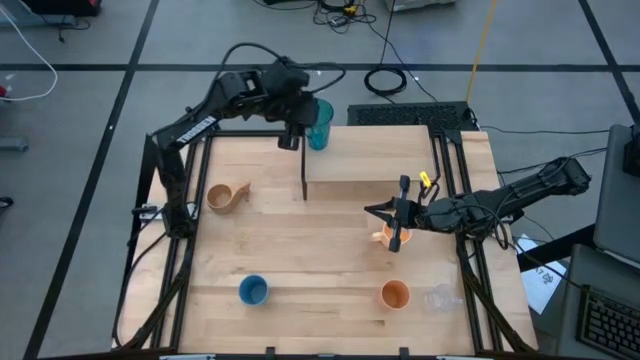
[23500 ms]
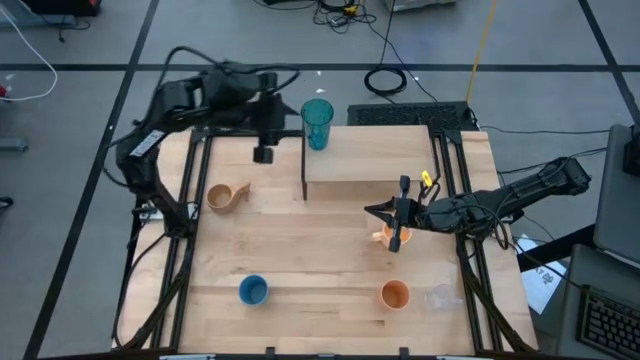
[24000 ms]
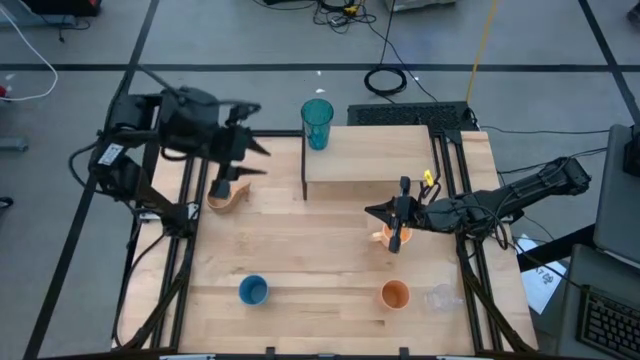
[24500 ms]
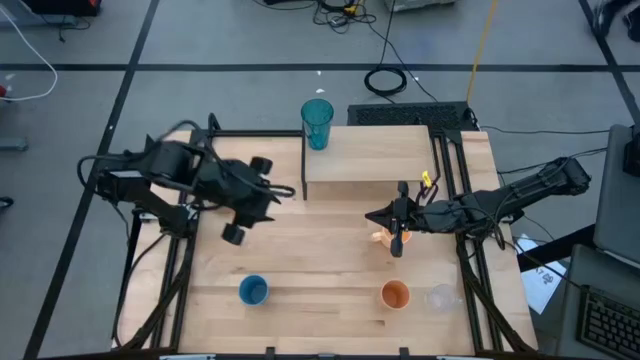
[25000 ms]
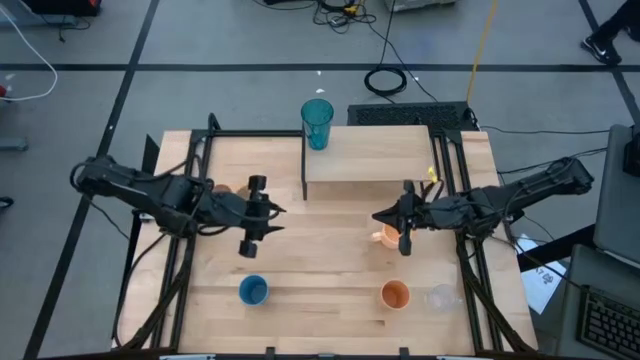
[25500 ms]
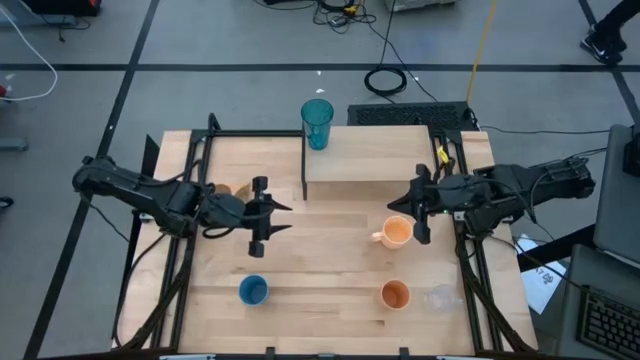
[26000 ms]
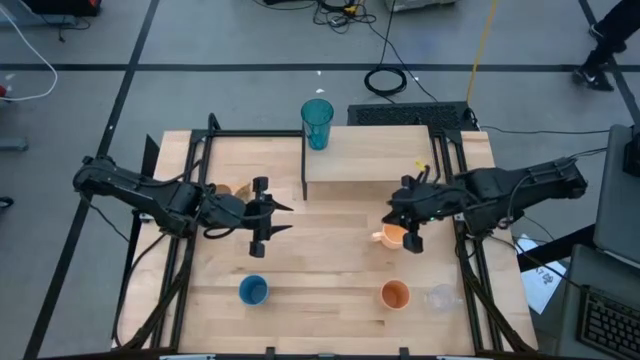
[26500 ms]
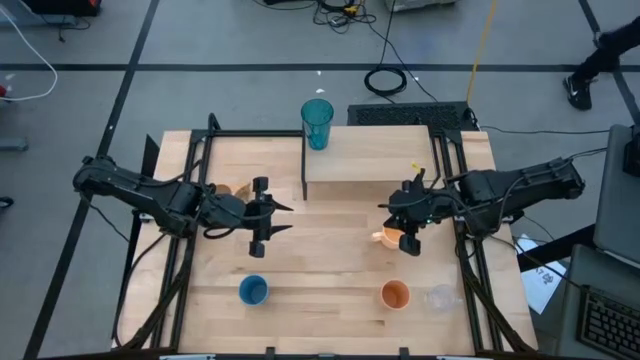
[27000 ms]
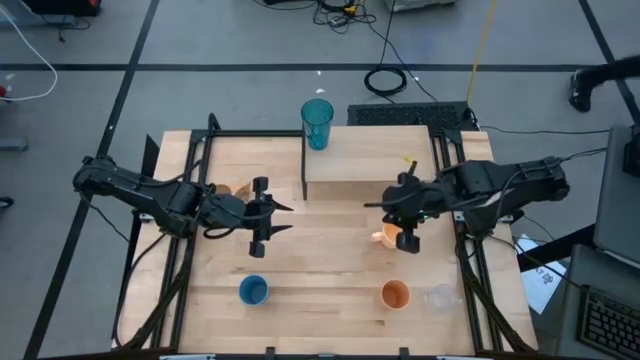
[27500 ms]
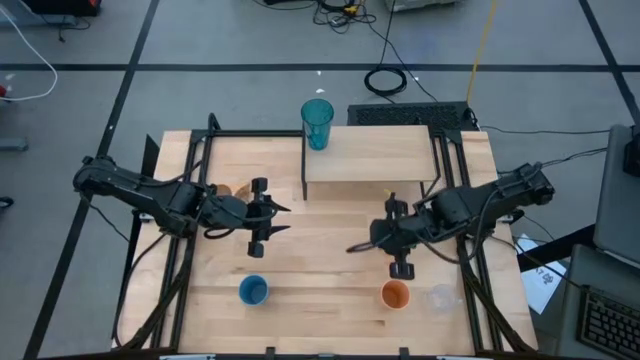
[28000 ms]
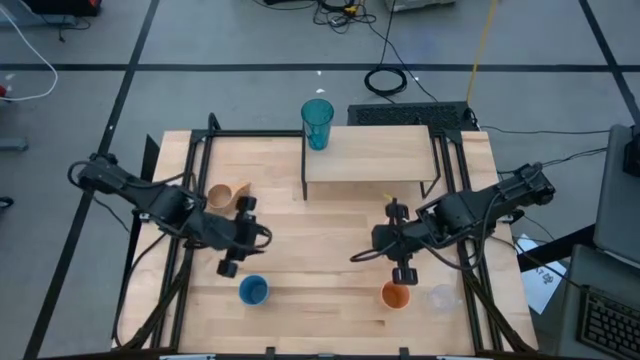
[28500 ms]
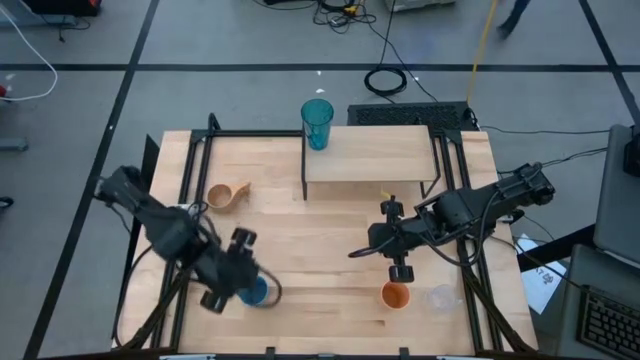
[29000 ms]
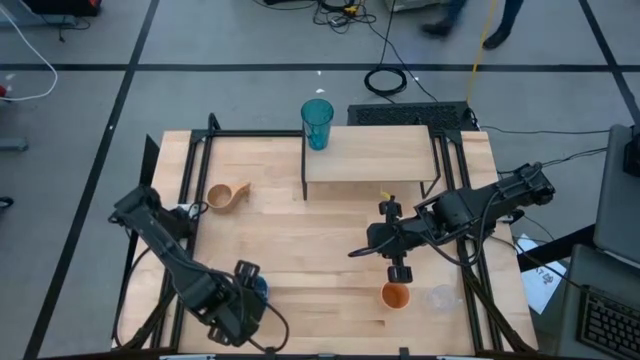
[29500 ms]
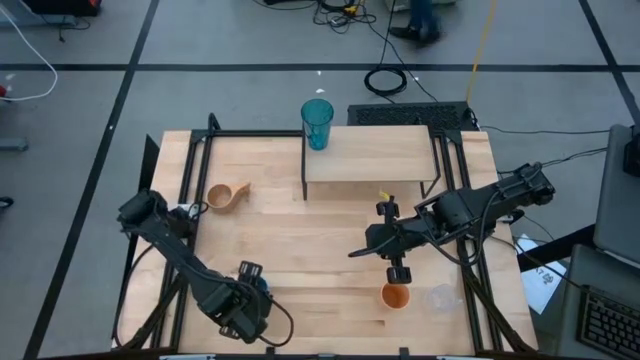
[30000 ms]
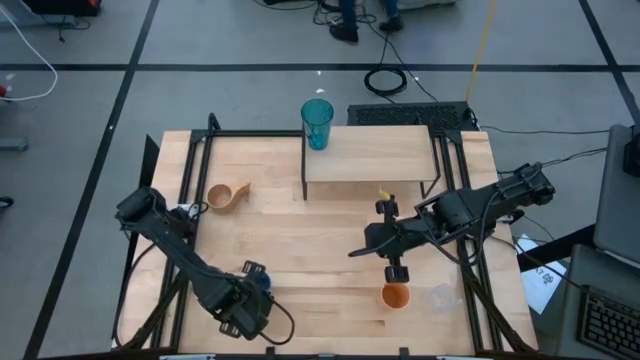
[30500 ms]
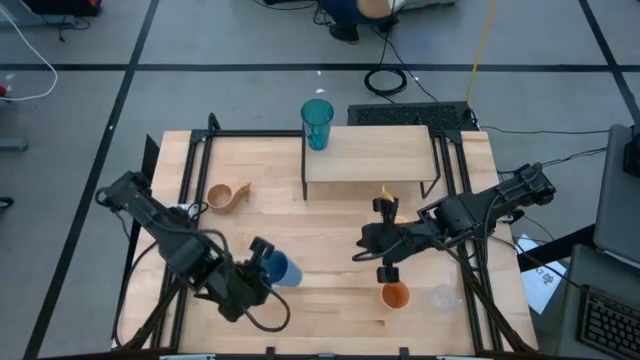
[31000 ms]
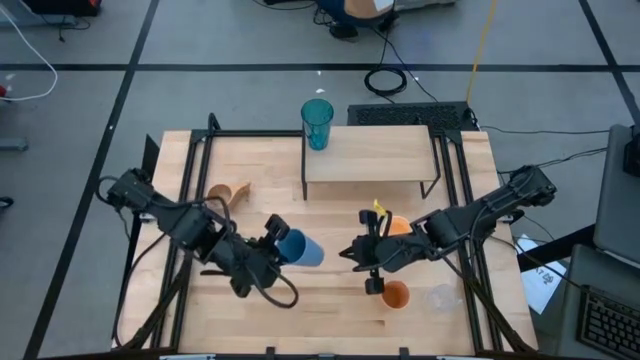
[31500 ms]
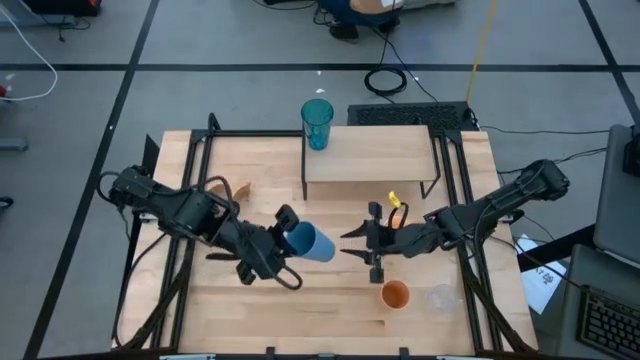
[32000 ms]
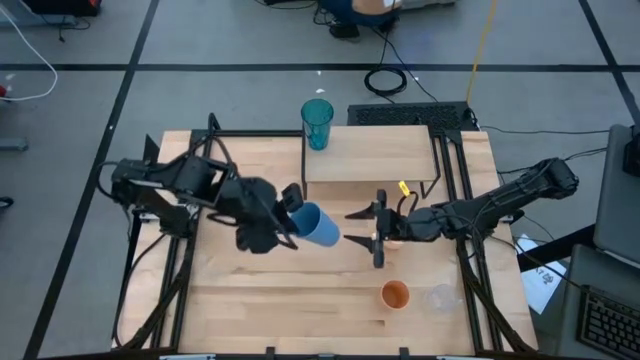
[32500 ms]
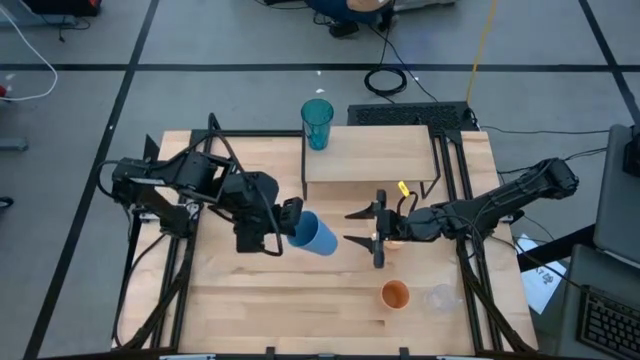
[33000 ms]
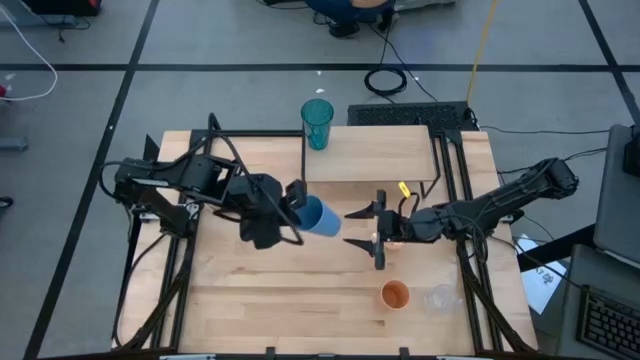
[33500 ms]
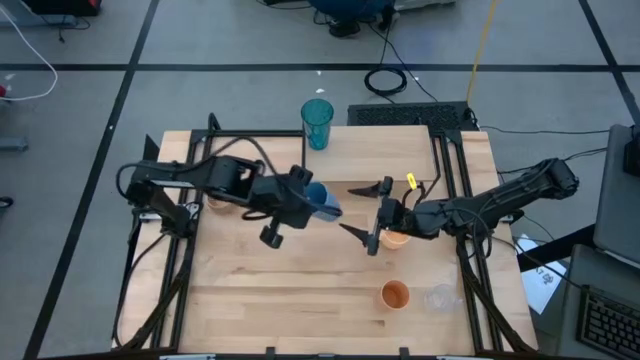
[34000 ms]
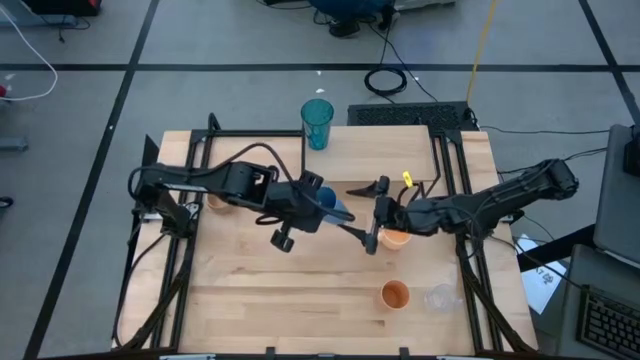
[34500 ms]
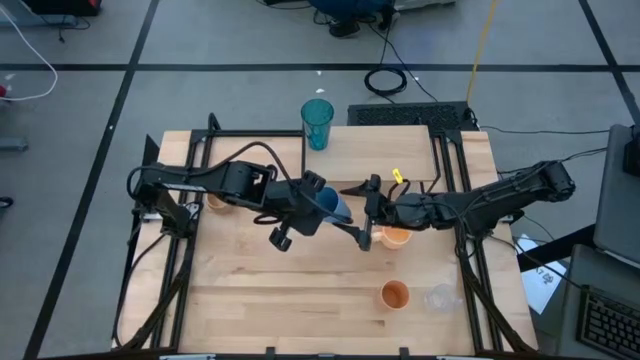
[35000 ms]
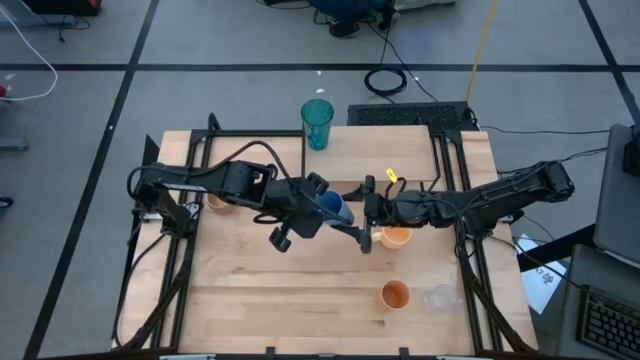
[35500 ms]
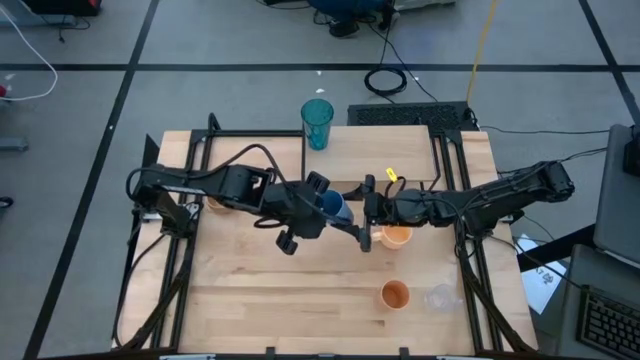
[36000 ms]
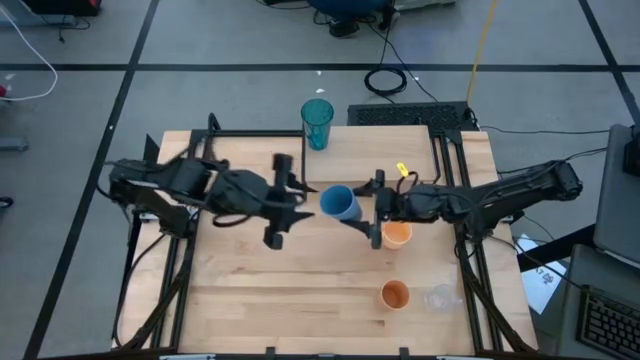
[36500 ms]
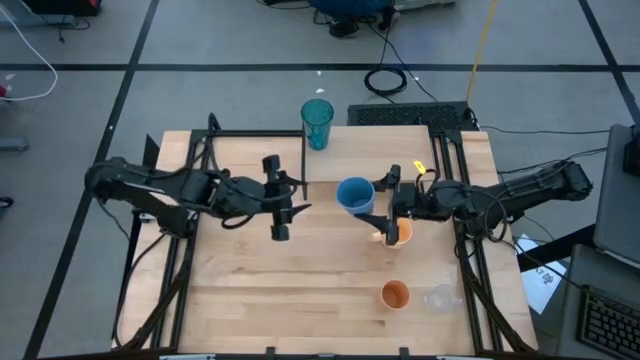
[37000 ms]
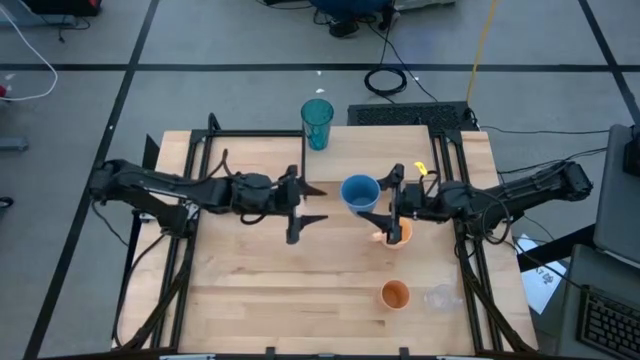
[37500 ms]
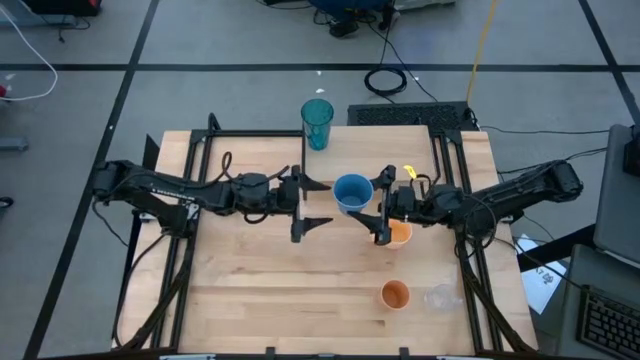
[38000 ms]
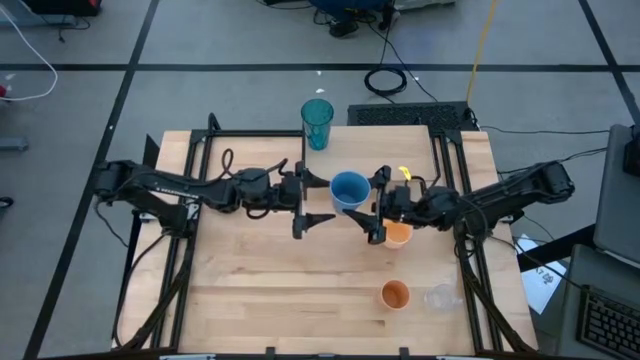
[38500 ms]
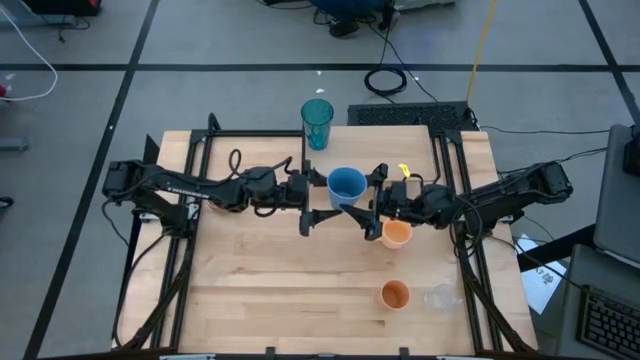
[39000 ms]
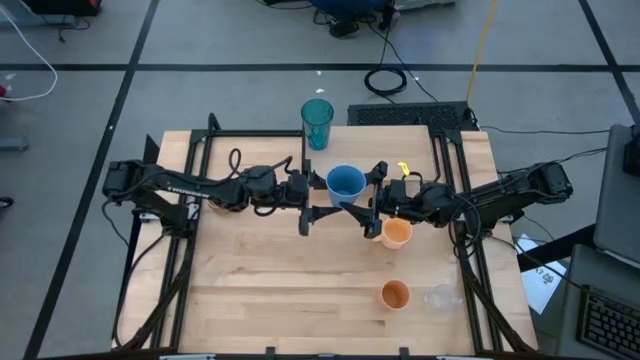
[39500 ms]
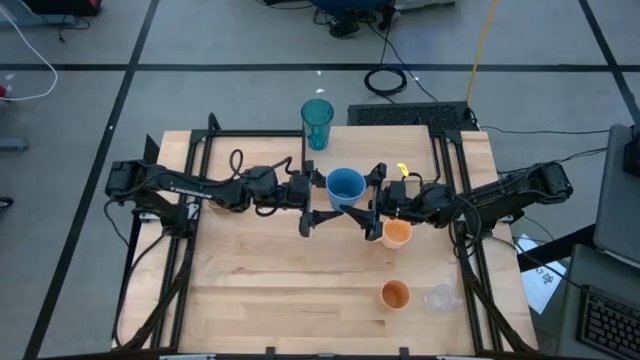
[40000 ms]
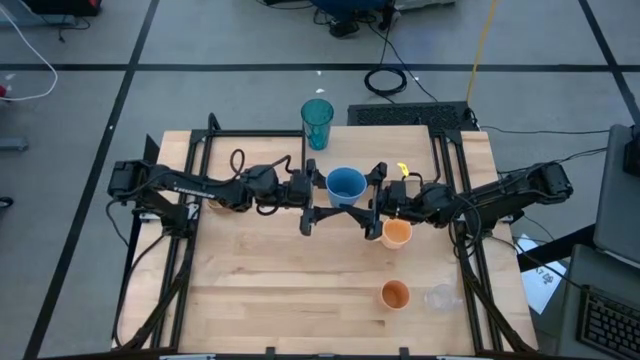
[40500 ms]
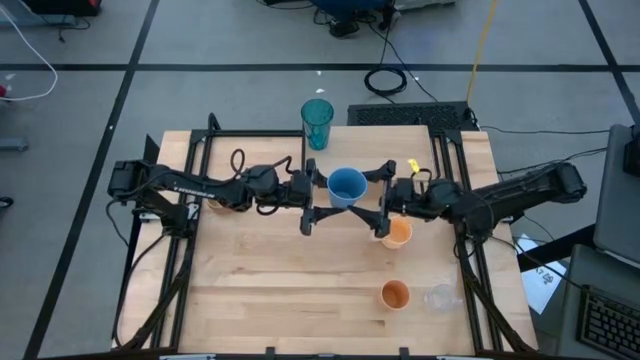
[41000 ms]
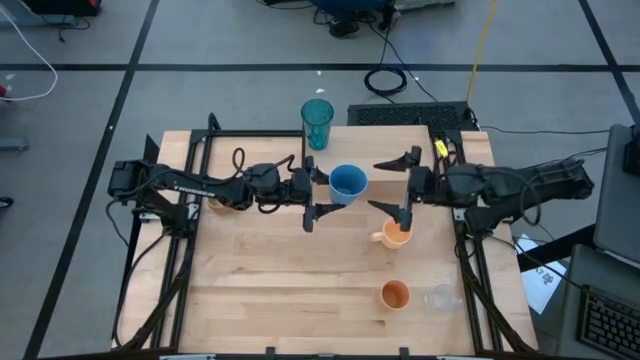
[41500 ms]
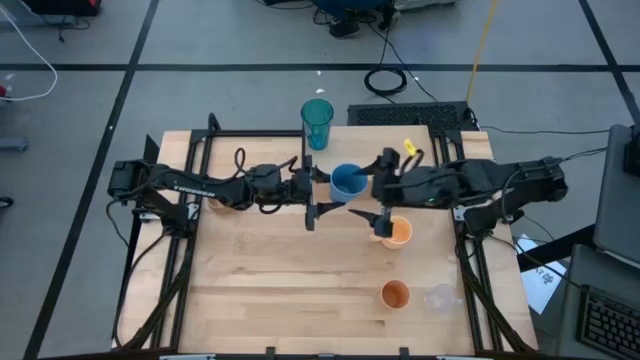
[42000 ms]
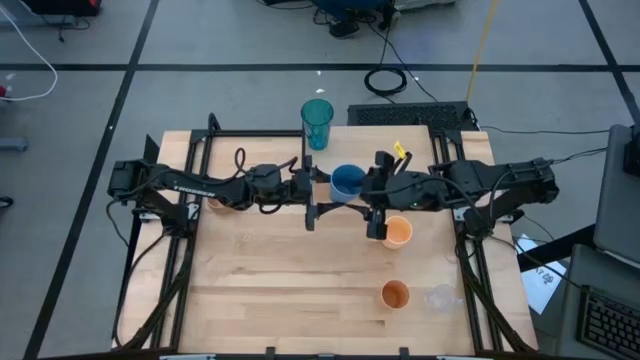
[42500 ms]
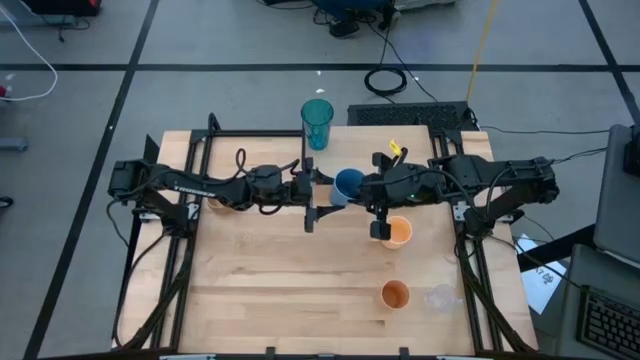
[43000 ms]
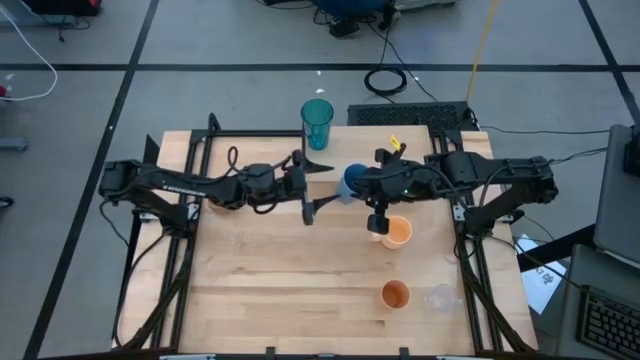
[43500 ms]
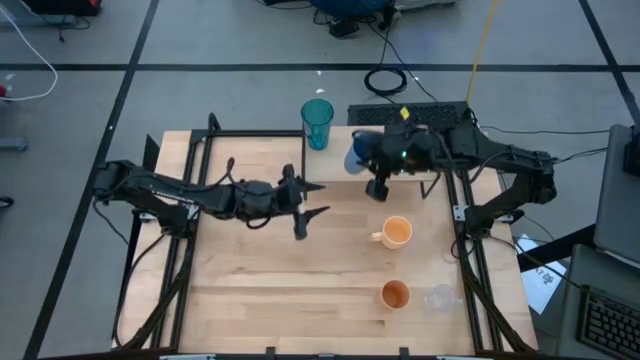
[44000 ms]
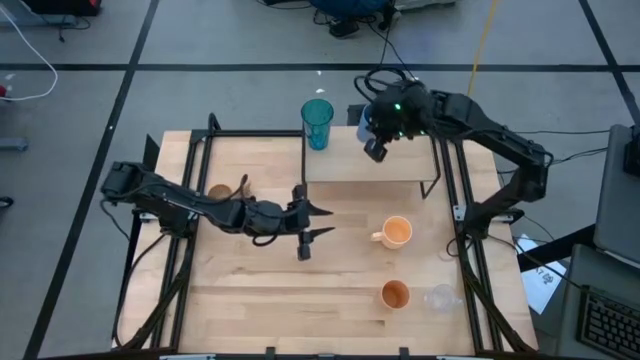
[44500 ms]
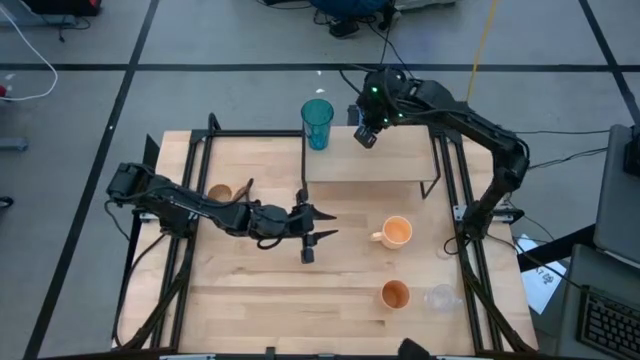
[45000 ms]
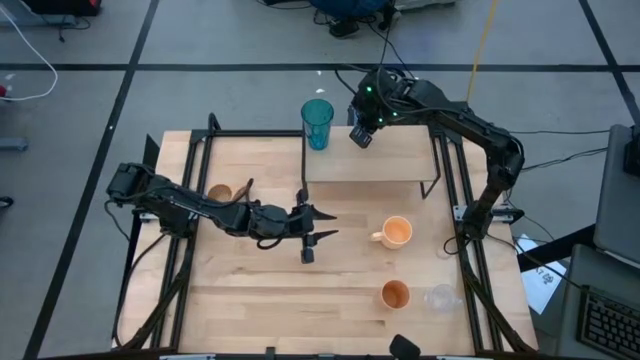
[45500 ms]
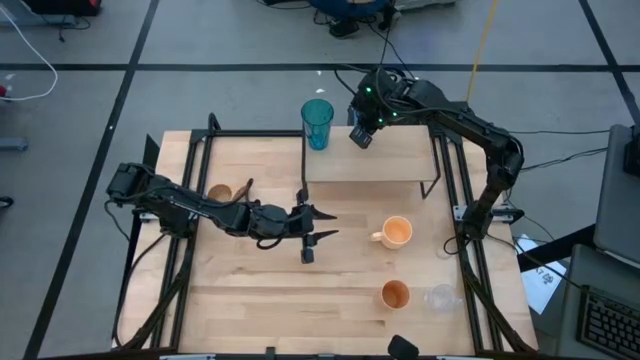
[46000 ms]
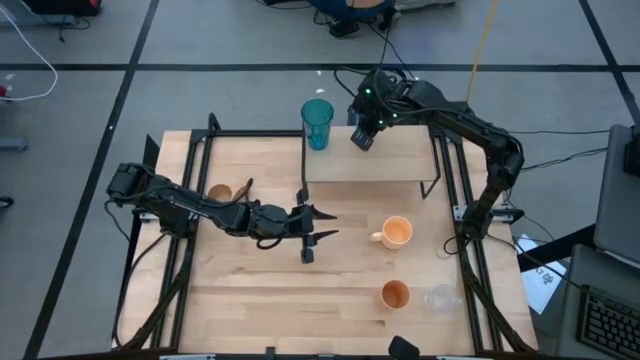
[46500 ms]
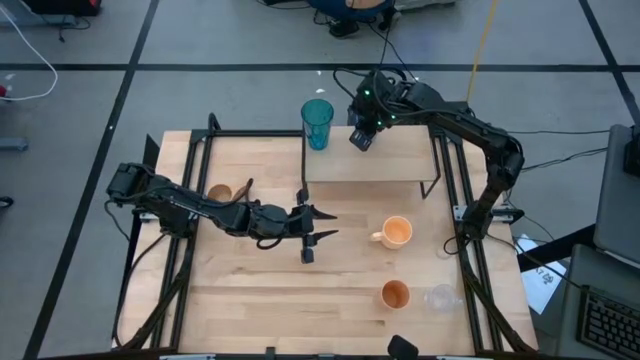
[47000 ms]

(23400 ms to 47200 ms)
Task: Stack small to large cups/mugs on shelf
Put the light blue cup on the shelf
